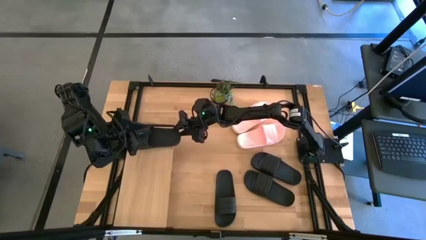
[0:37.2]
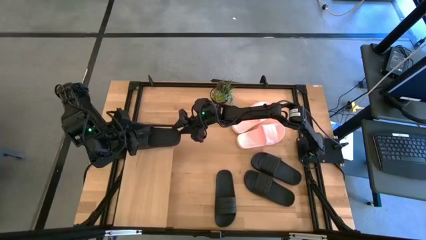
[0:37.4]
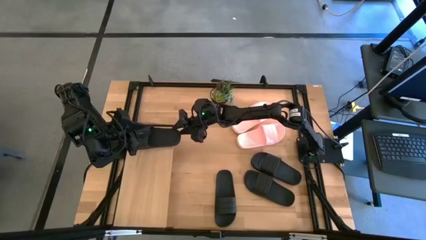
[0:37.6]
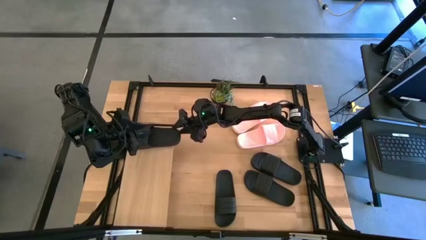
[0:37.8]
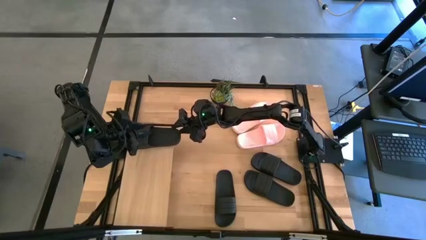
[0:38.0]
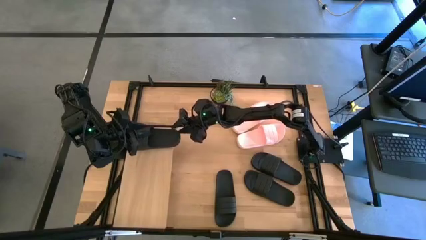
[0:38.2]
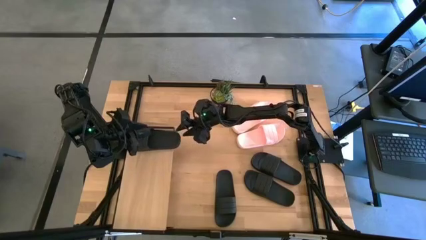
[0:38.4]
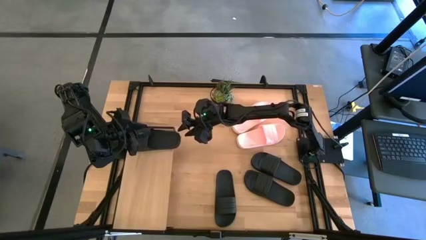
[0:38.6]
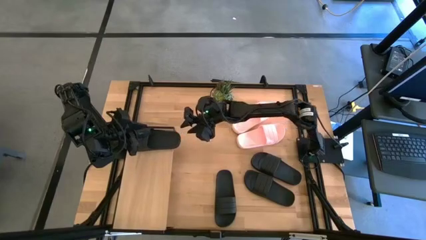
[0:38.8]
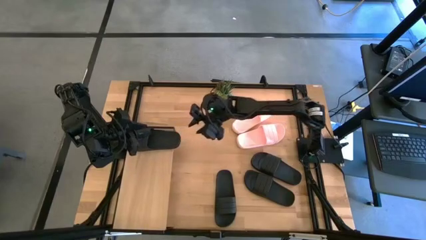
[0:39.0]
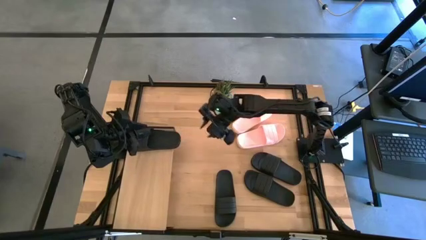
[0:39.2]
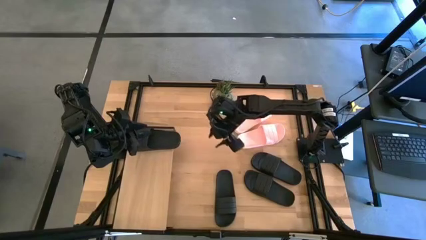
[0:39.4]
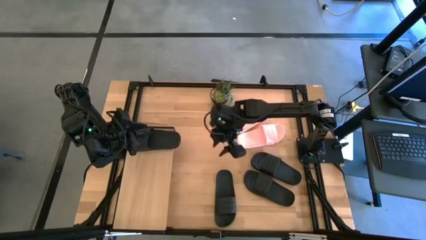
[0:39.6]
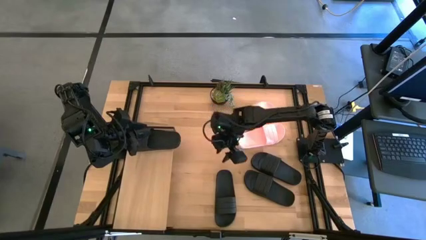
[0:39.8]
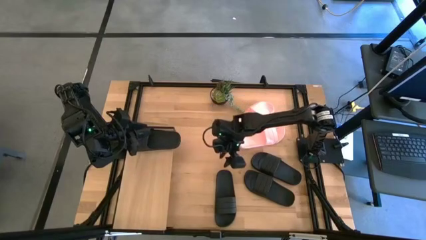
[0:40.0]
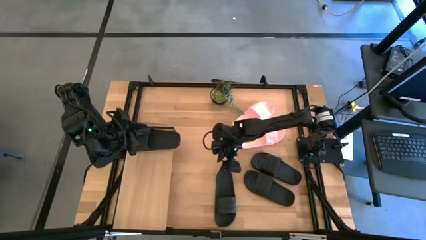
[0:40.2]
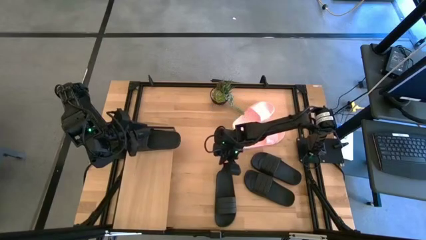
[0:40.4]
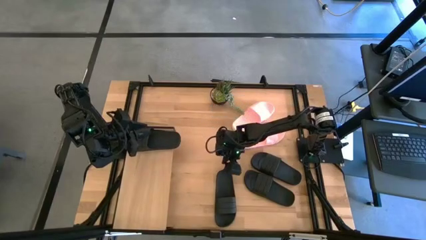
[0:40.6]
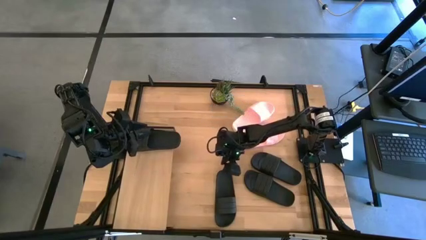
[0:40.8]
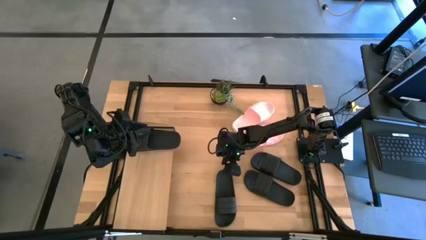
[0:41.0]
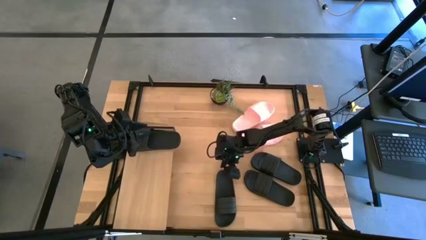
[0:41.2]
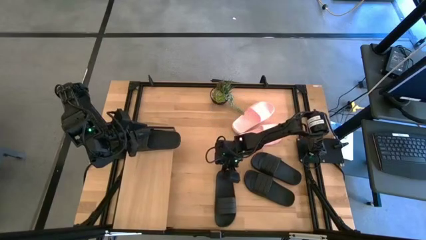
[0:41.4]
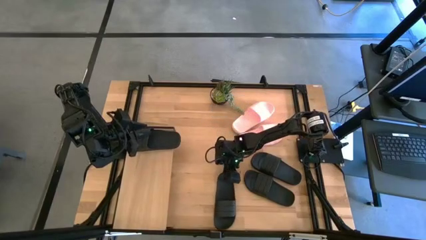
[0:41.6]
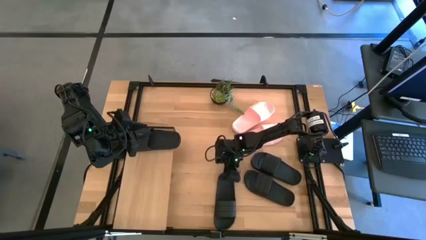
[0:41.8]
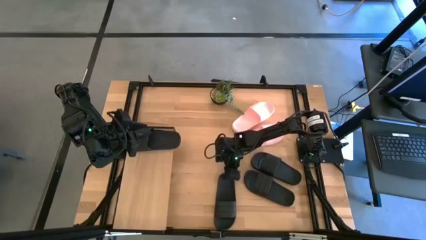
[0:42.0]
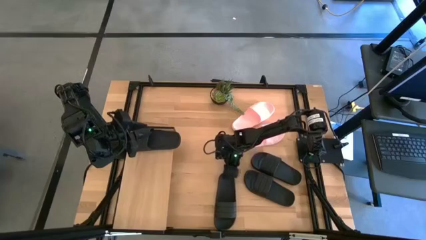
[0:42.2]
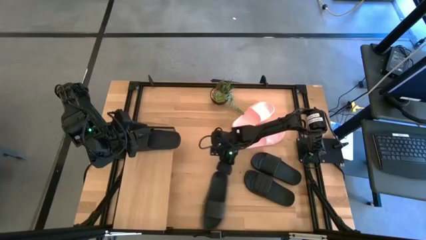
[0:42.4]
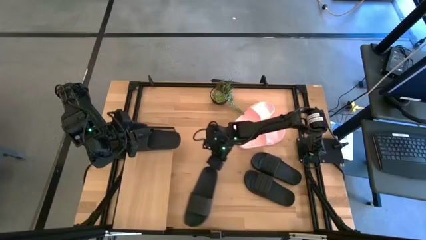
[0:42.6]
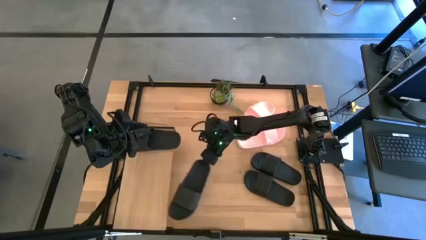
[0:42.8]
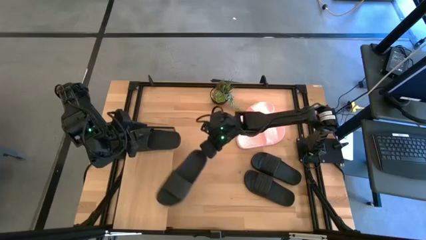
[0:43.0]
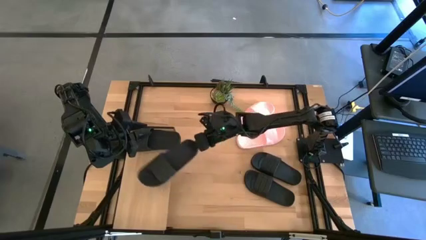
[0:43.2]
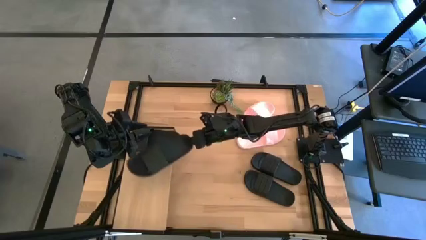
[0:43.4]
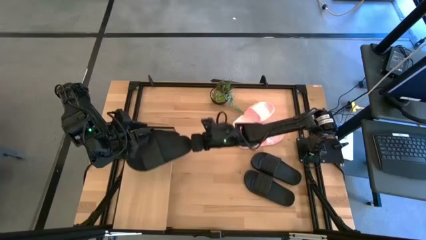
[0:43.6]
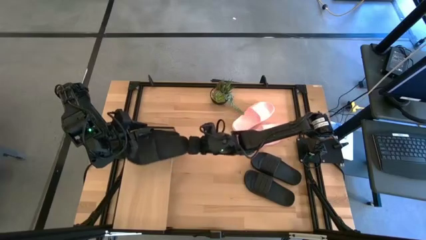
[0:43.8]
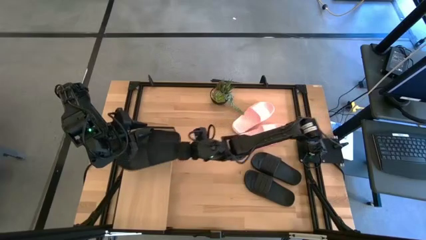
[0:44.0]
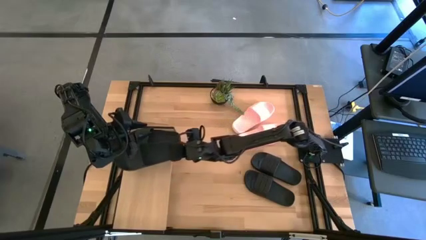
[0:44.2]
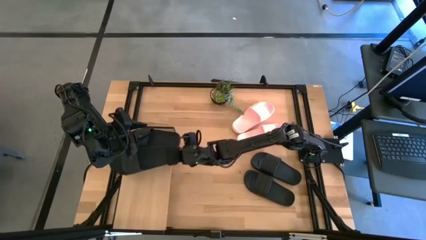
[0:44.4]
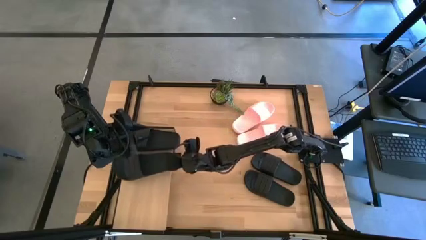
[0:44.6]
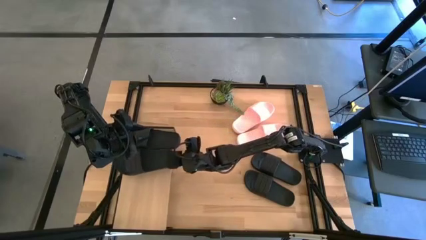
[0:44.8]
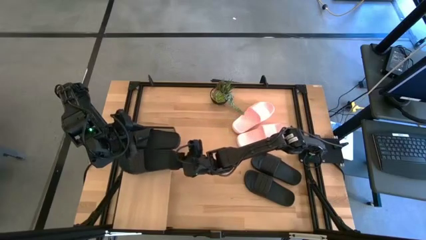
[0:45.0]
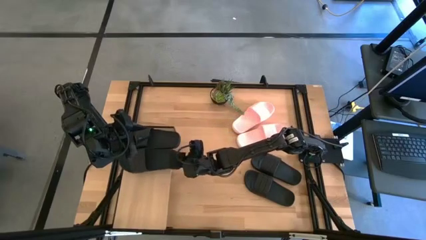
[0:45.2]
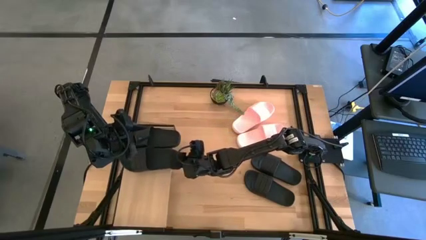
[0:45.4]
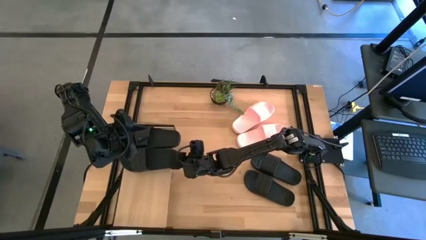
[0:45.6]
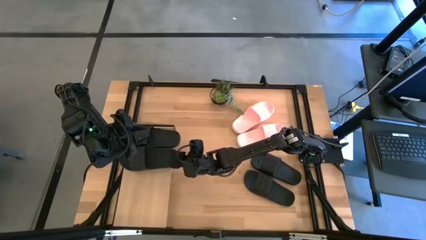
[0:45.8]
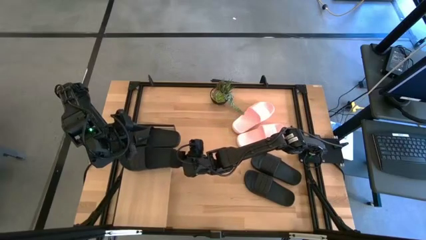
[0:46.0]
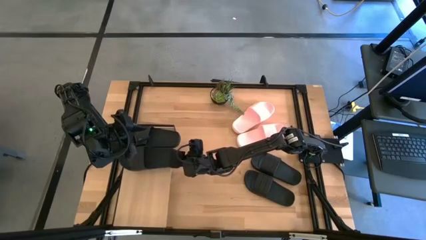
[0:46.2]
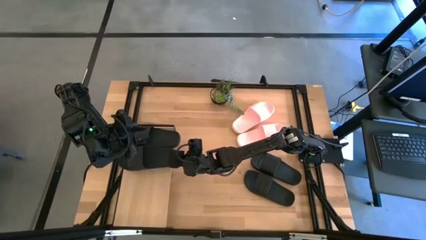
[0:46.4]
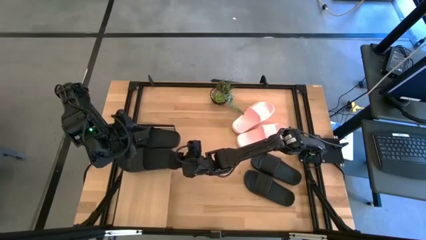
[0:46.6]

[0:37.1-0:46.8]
Task: Pick and place slides into the shelf
Put the black slipper on the shelf

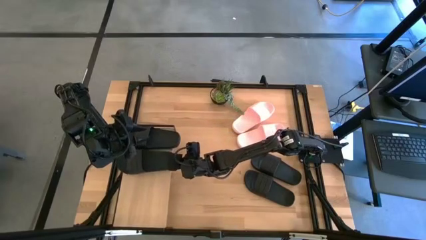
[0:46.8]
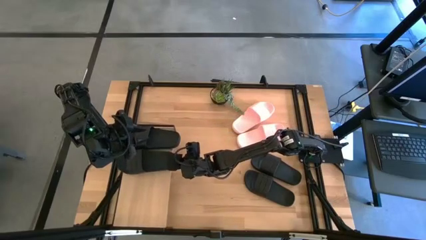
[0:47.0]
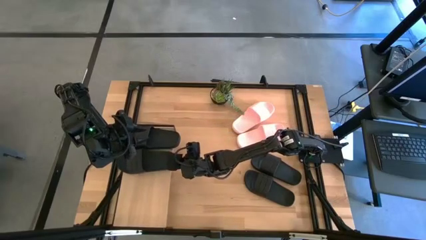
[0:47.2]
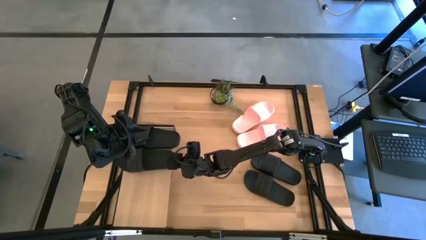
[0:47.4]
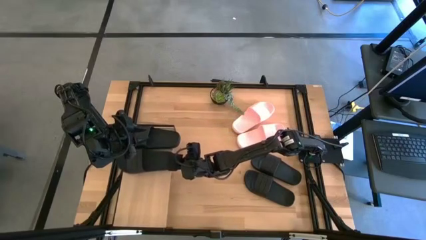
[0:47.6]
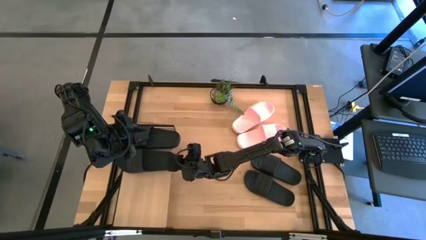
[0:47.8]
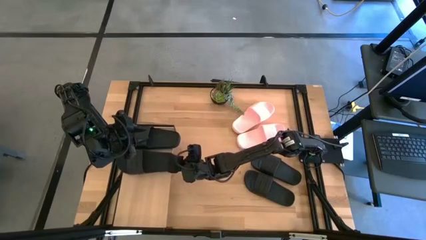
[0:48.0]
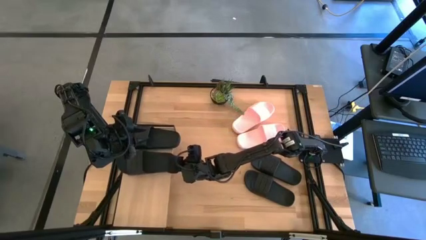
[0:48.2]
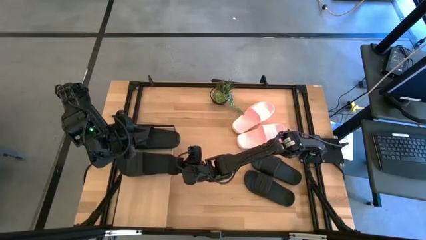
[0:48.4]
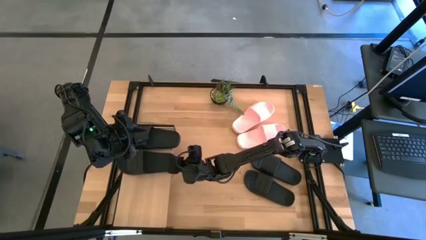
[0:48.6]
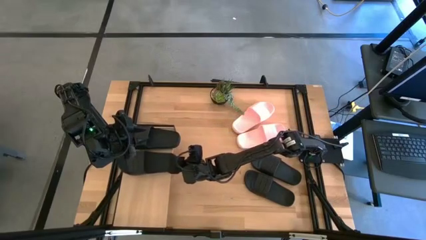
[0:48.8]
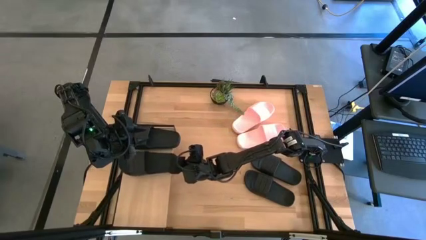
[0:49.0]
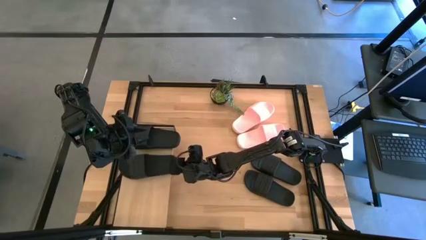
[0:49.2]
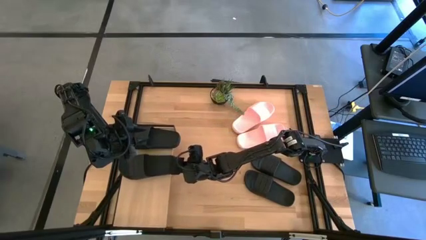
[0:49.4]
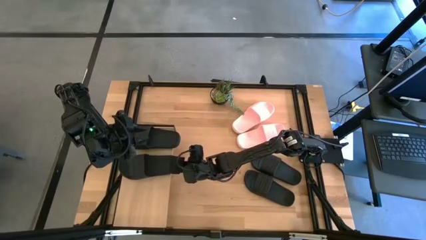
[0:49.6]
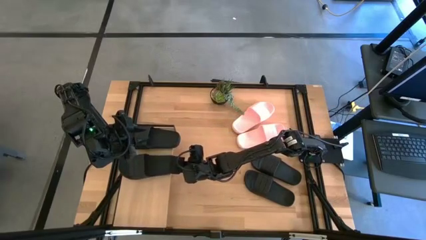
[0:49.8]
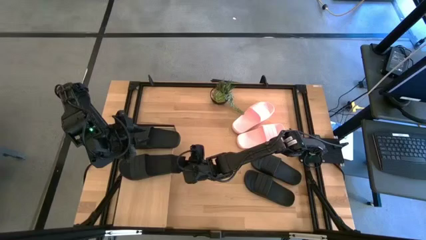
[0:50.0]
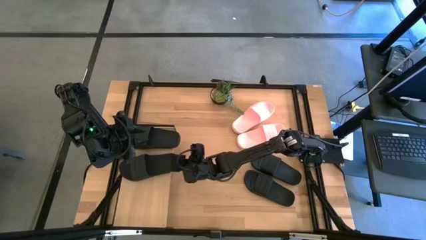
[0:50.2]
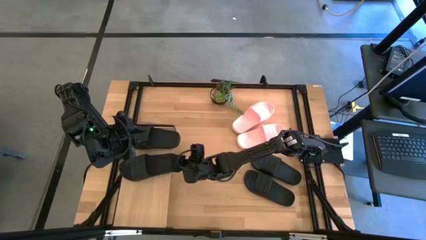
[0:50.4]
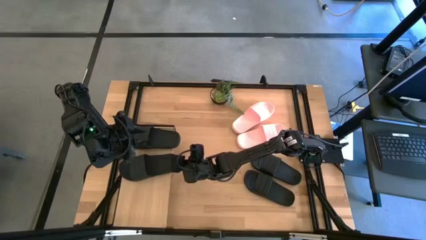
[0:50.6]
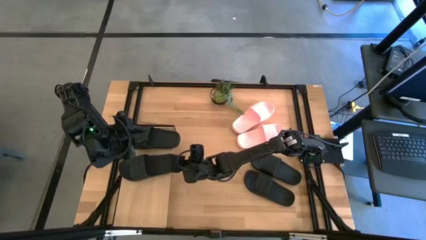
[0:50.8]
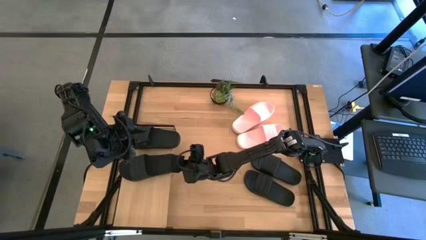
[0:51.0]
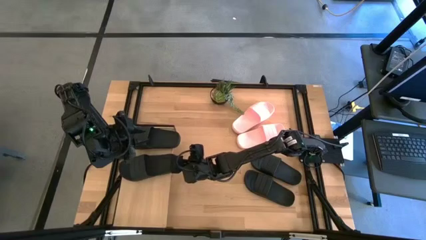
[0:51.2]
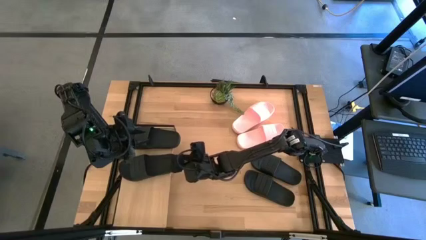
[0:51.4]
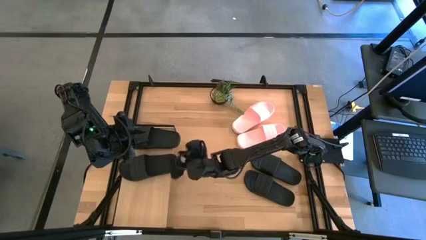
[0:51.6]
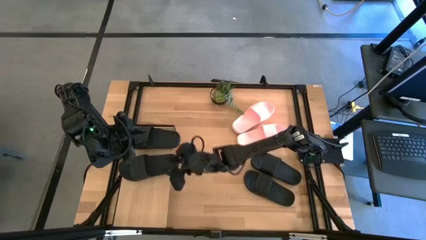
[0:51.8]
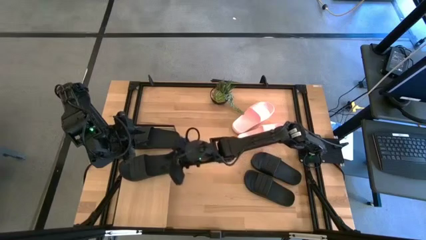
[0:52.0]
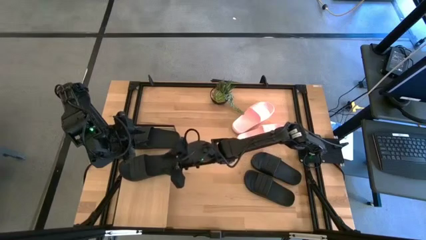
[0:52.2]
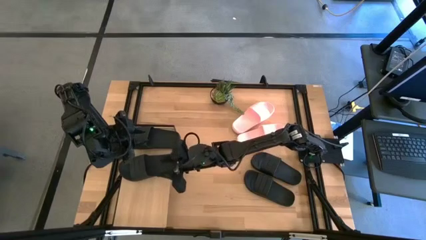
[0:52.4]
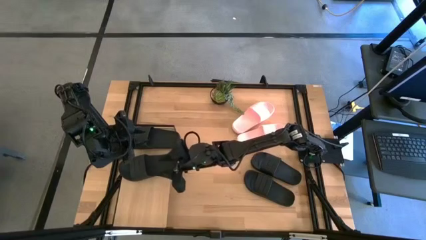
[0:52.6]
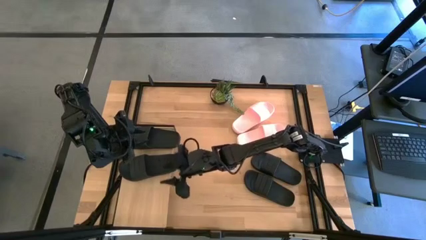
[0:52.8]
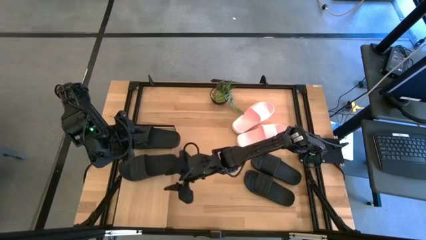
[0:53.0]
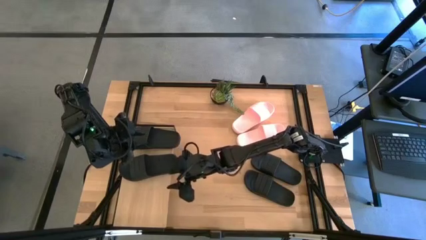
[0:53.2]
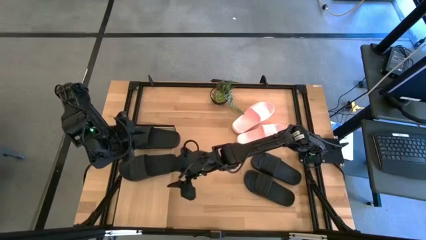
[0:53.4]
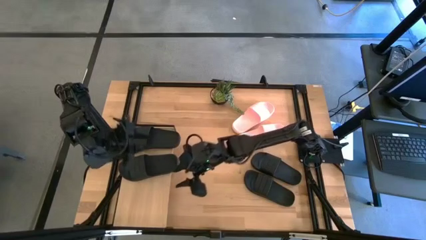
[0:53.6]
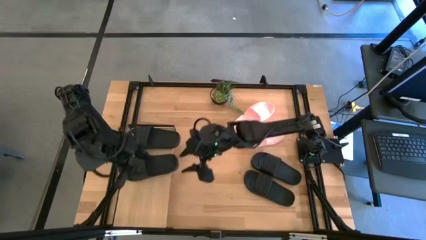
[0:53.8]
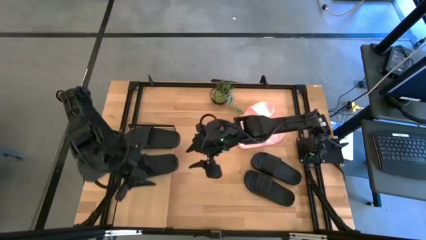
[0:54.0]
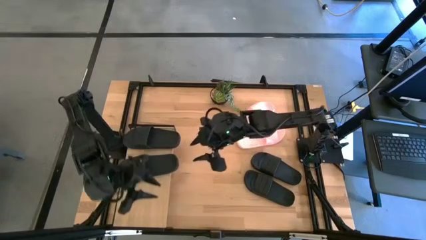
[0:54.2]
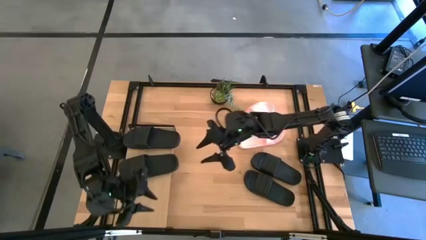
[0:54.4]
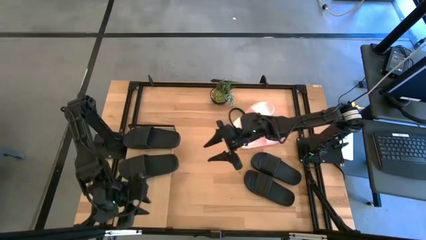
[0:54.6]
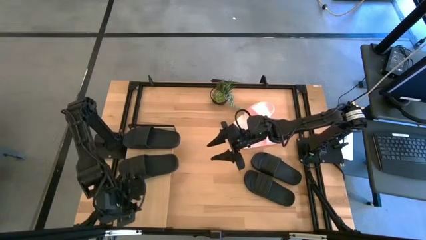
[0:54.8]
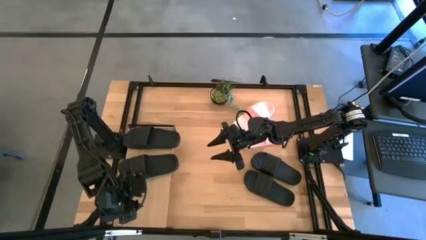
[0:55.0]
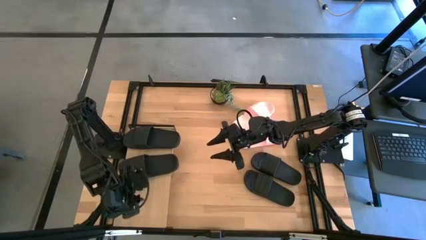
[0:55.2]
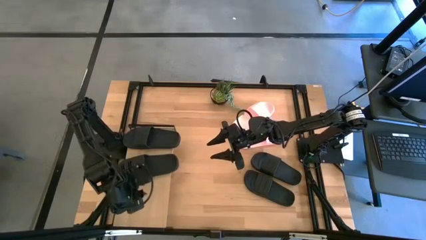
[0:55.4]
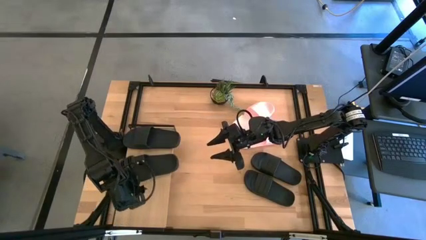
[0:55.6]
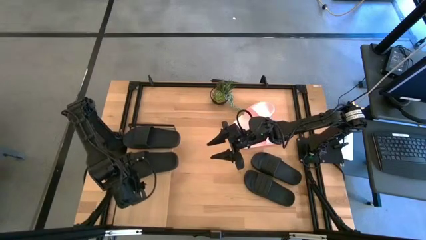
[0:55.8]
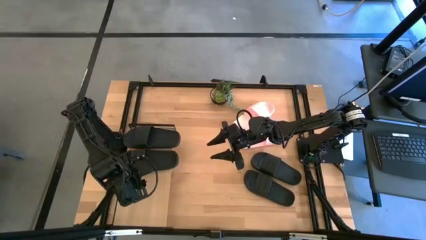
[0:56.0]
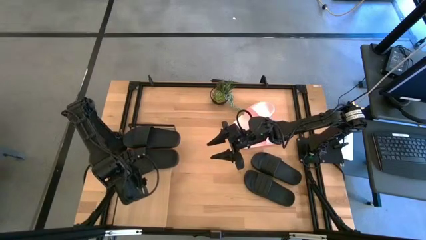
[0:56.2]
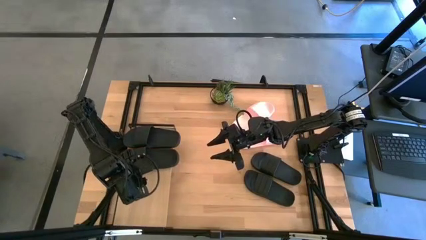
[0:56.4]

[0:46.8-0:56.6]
Put the black slipper on the shelf
